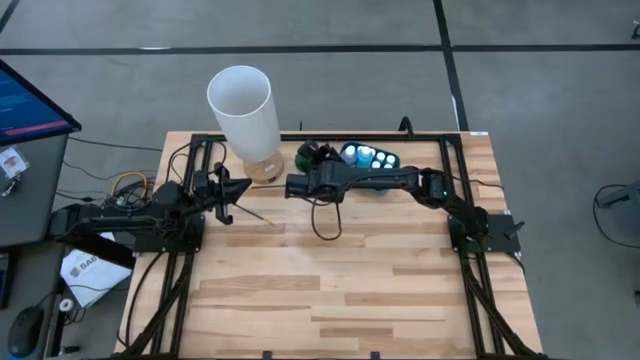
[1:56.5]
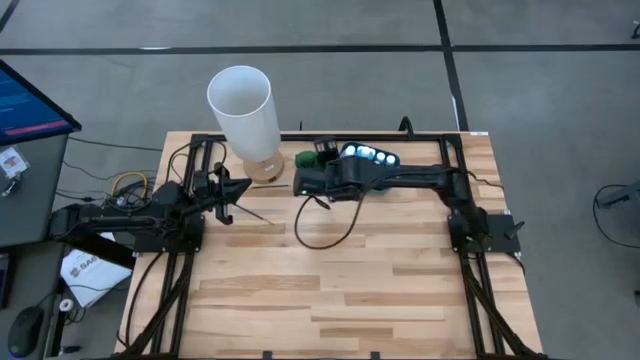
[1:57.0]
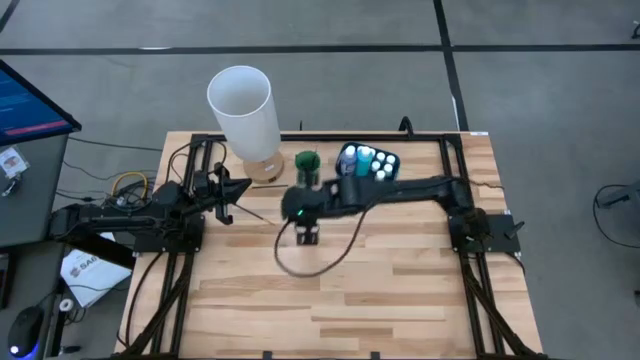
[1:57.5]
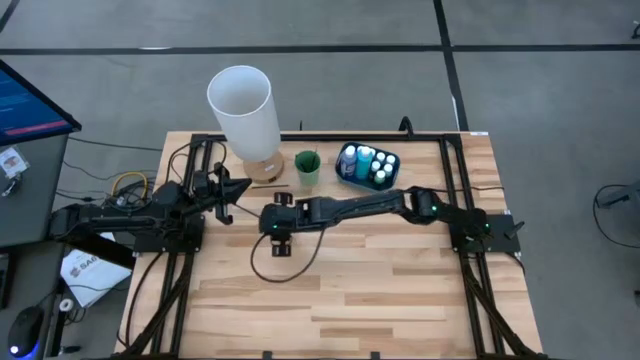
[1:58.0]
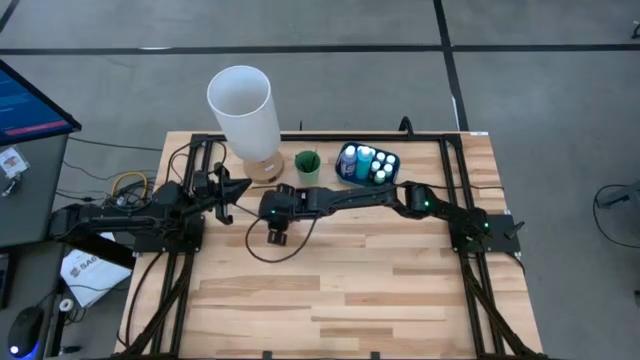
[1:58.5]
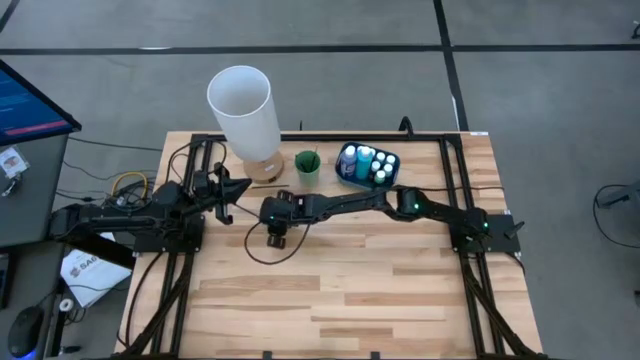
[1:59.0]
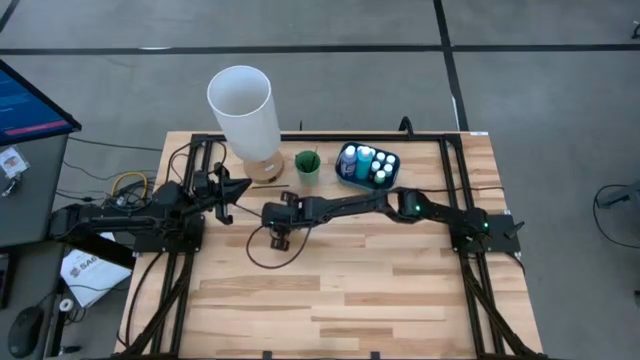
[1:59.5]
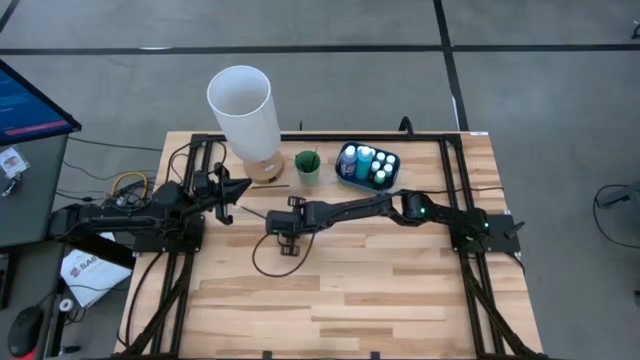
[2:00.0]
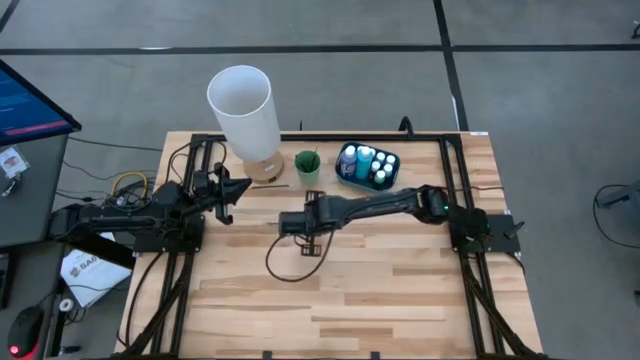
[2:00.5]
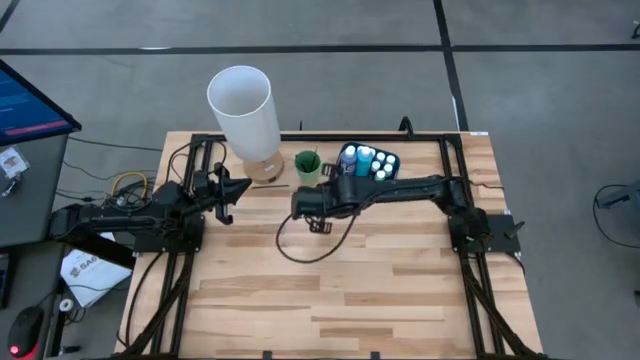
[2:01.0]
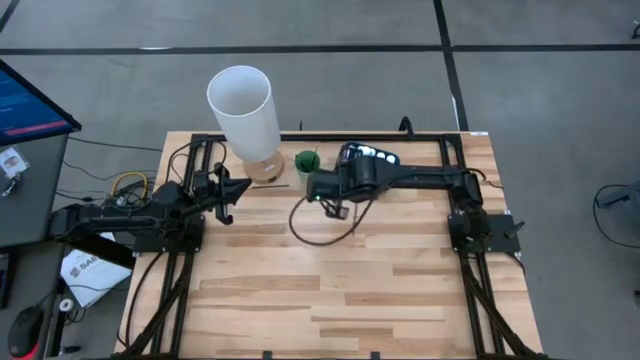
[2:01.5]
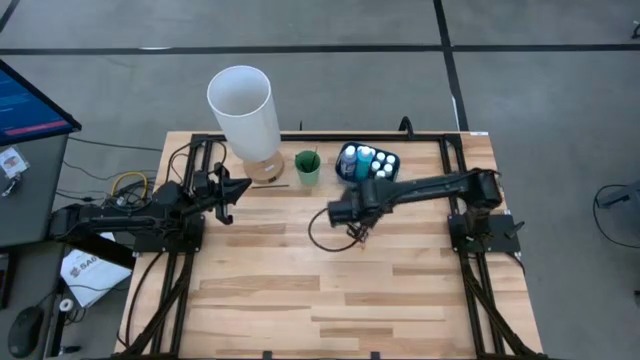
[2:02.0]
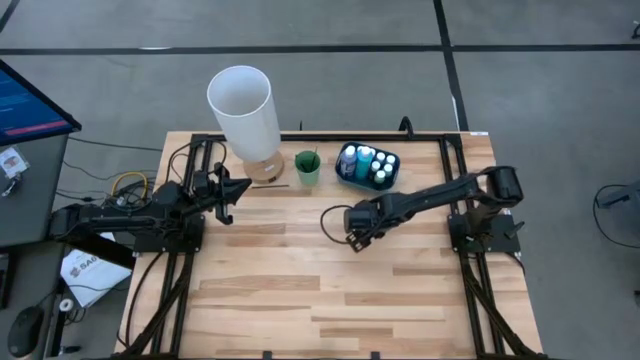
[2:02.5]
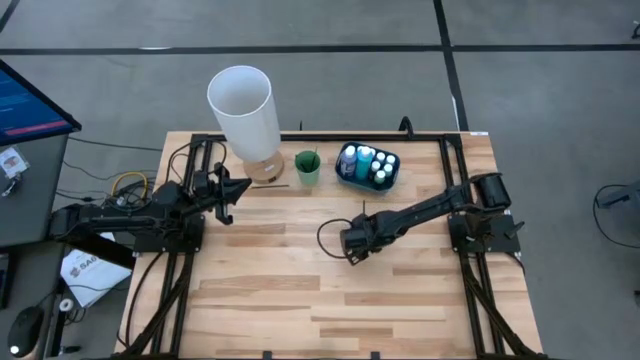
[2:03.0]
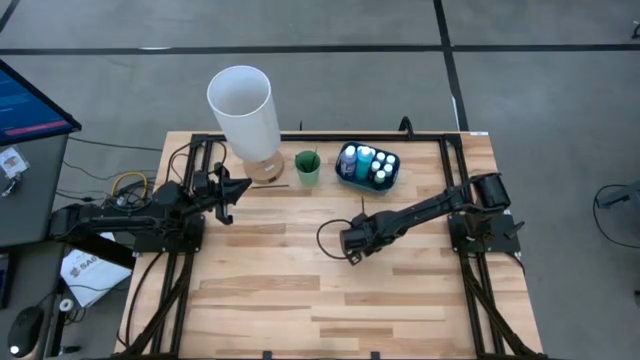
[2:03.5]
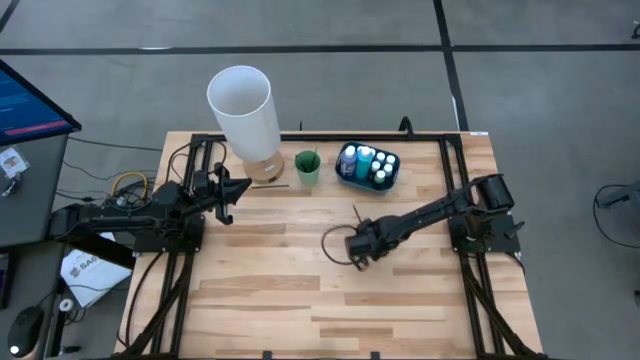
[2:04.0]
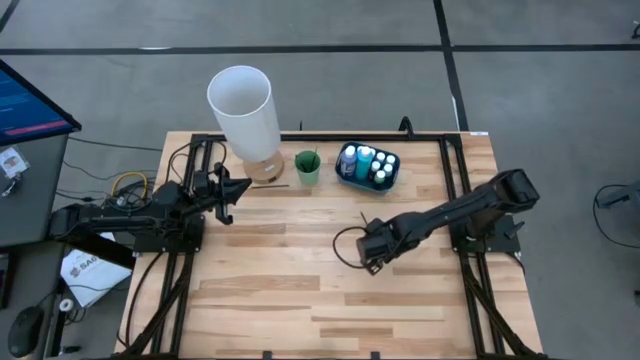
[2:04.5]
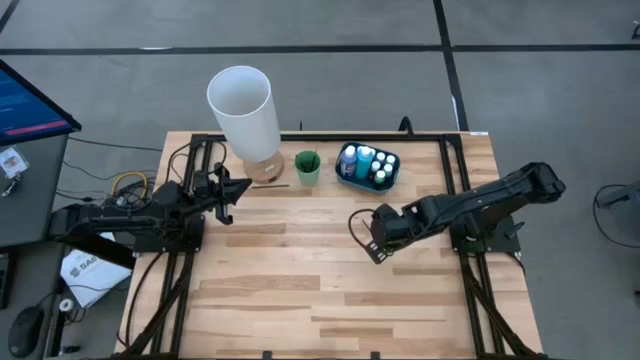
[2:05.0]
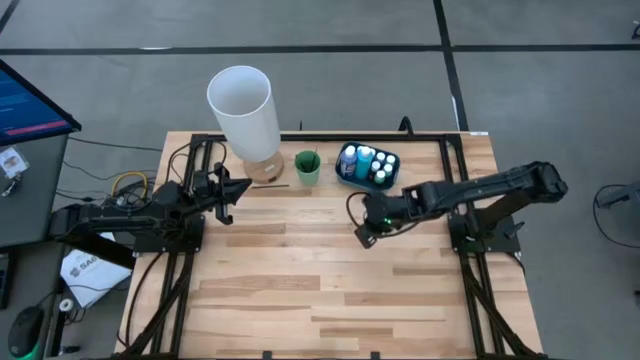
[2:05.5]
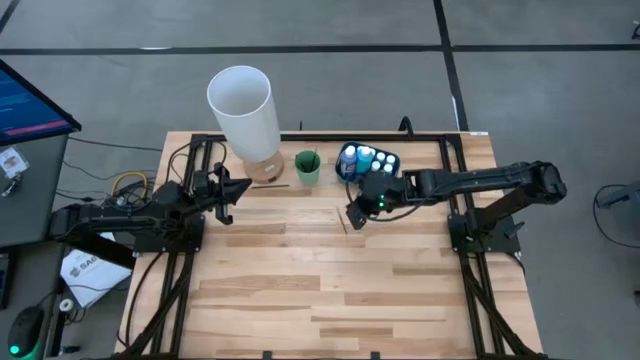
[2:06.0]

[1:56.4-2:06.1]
Task: Pick & Place Paint Supplies
Put the bottom gold paint brush into the green cup

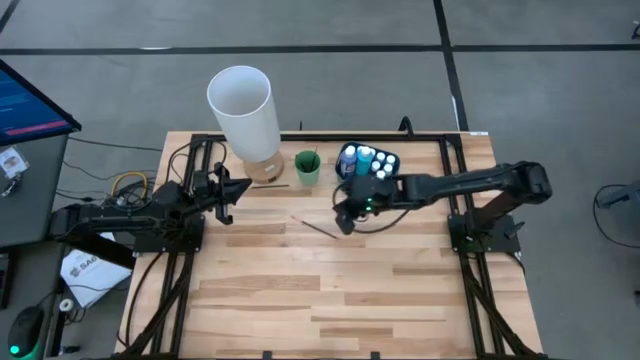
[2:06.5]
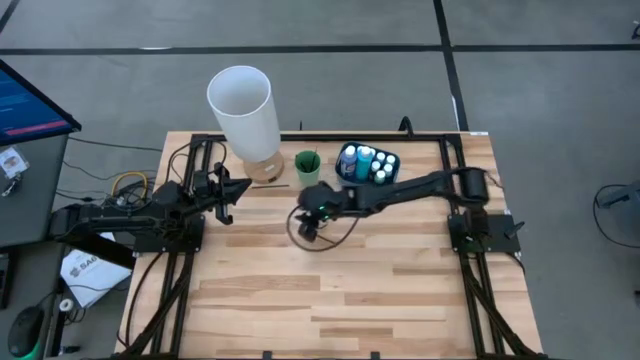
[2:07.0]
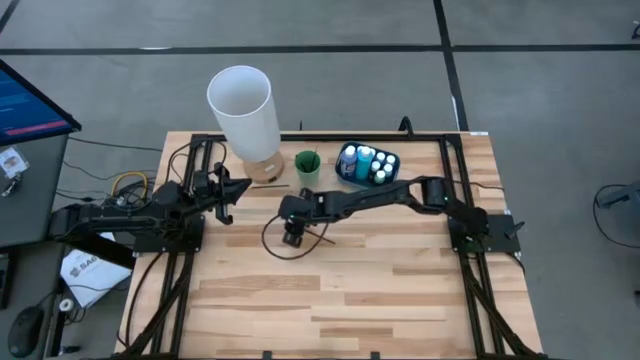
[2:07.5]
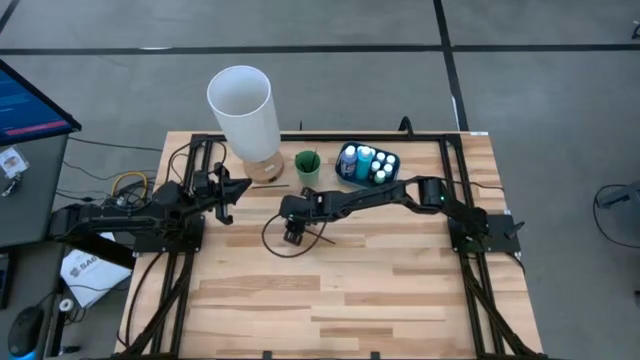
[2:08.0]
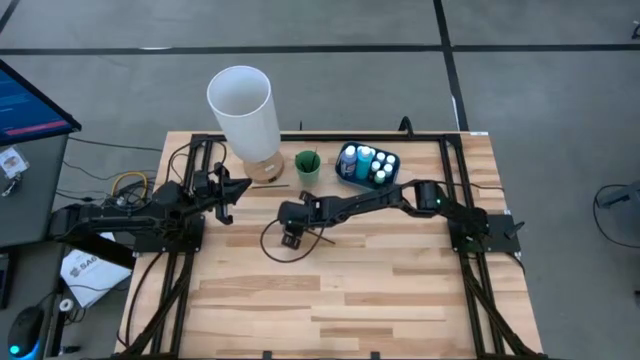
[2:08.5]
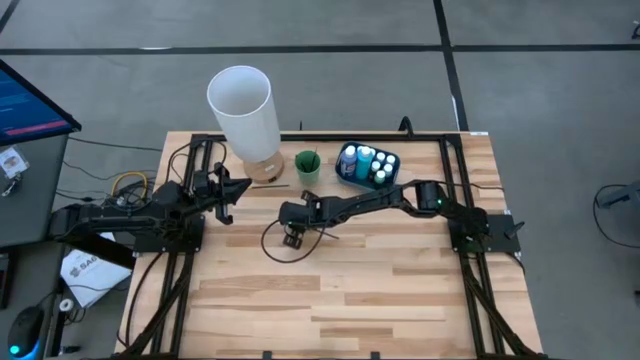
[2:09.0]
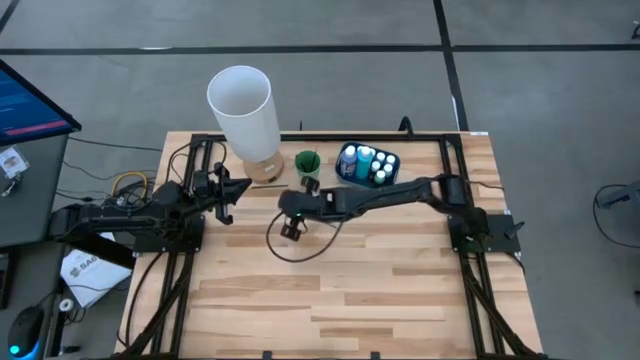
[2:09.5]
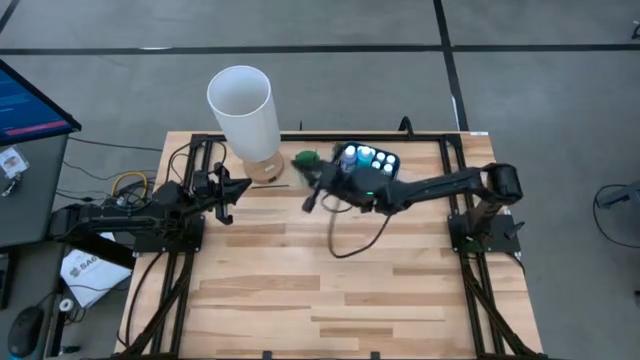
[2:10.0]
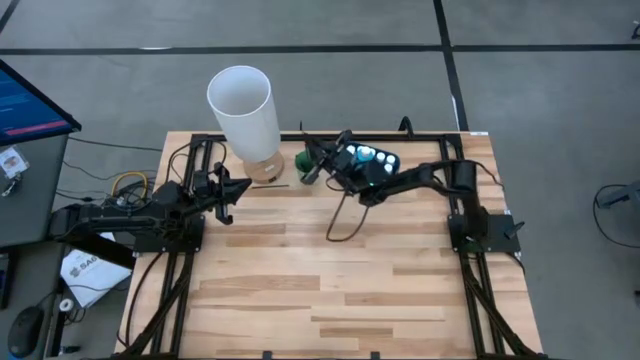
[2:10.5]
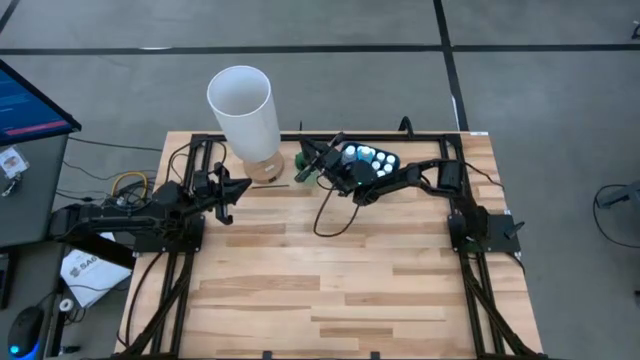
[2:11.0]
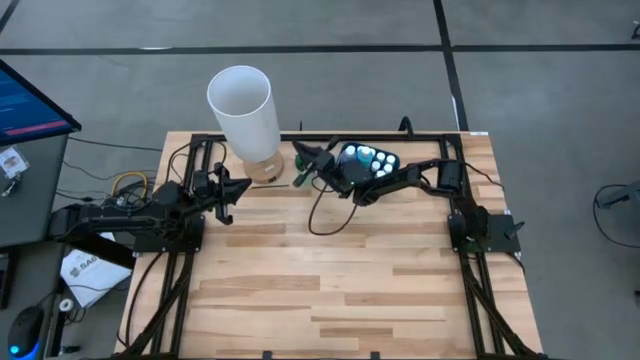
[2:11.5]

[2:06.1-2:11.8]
Put the bottom gold paint brush into the green cup

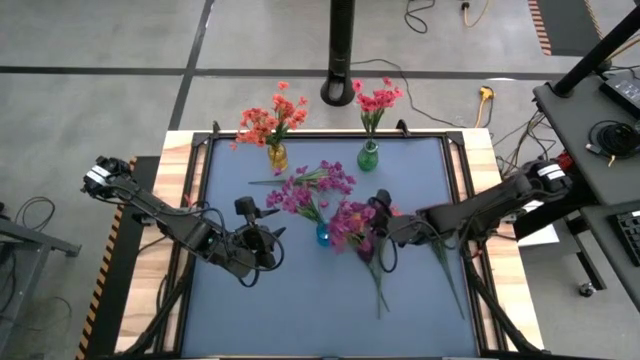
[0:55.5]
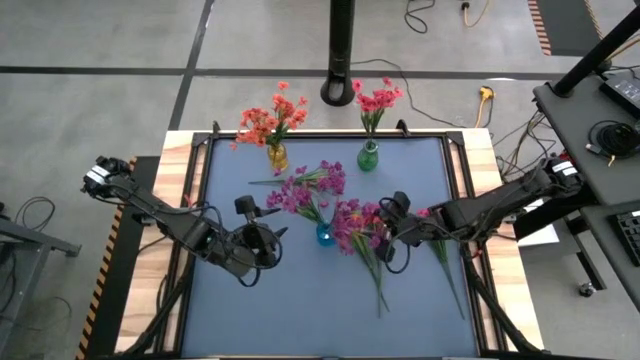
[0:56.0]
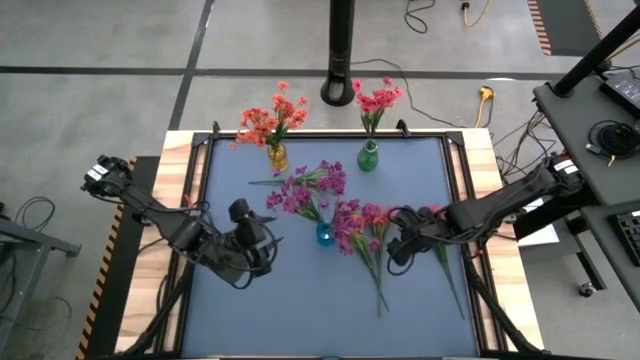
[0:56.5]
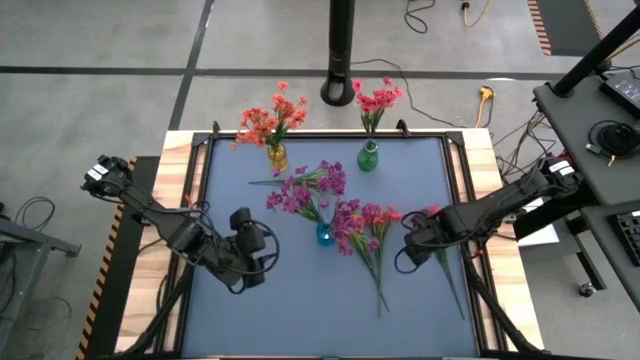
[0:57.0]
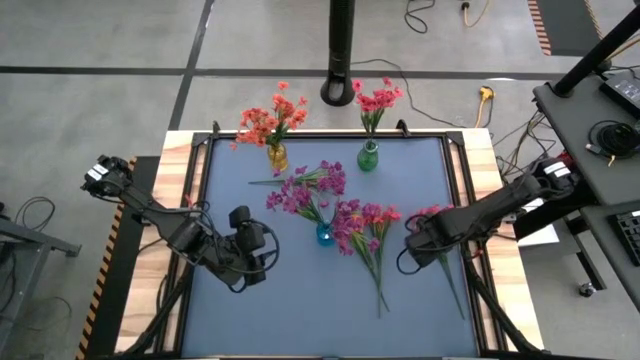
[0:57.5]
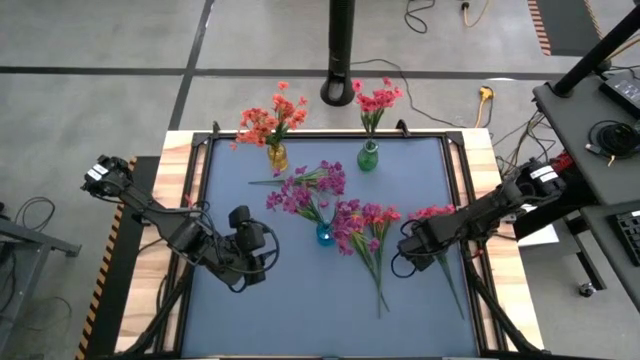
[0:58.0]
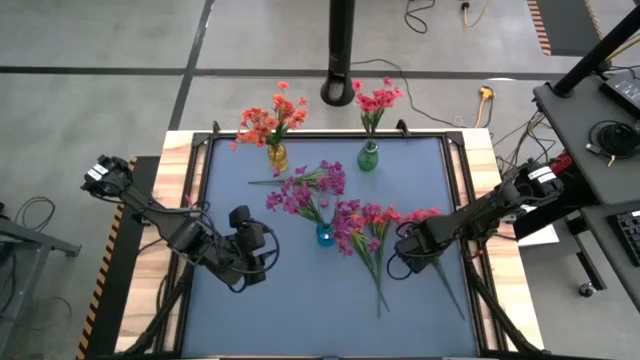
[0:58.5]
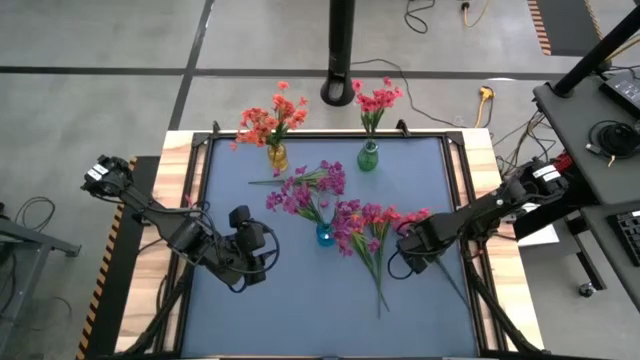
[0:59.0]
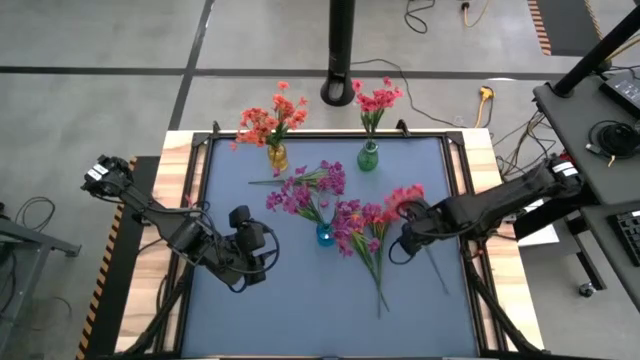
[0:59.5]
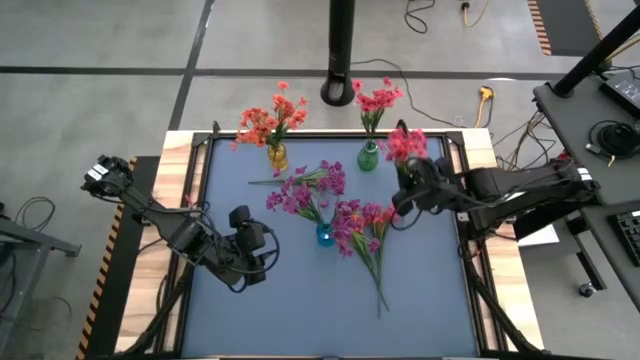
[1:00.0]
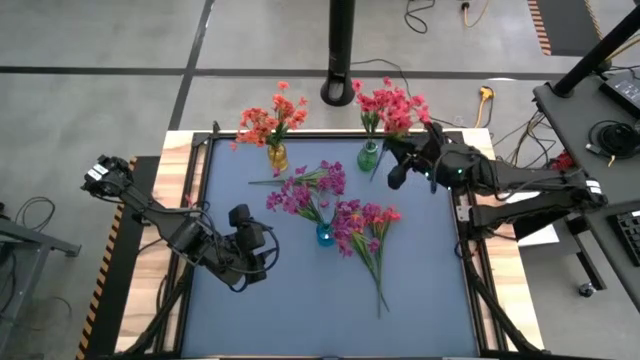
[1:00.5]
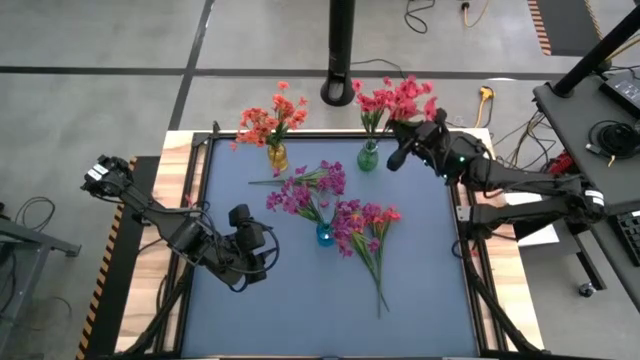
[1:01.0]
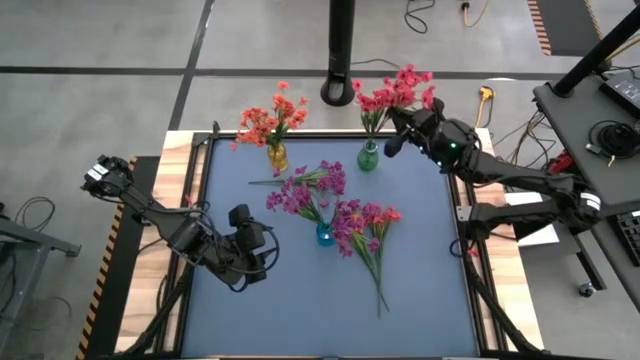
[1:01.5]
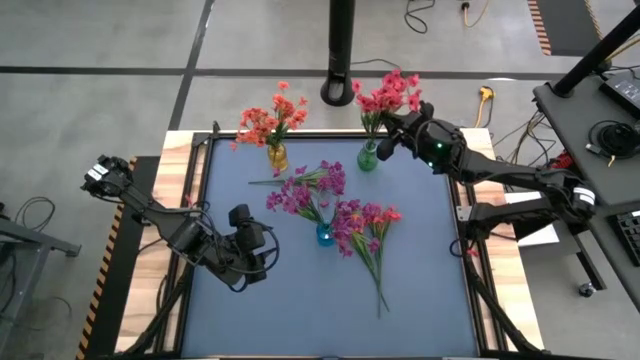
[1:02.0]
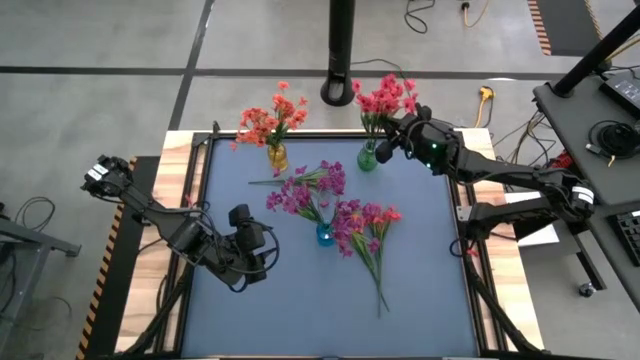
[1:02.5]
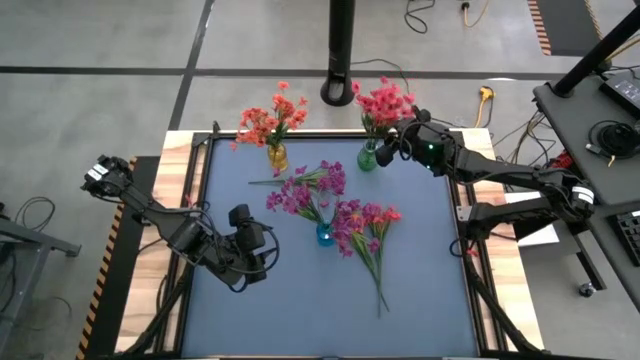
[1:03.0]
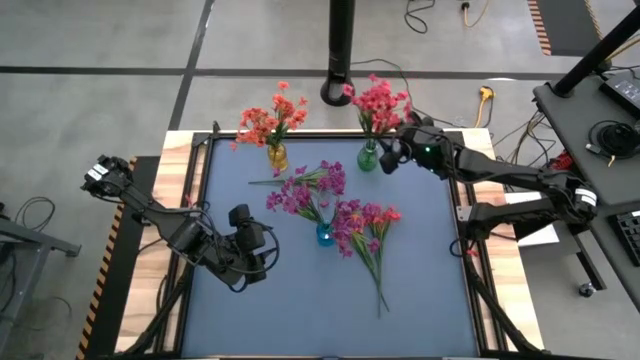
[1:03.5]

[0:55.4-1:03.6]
Task: Sort flowers into vase by color
Put the right red flower into the green vase
